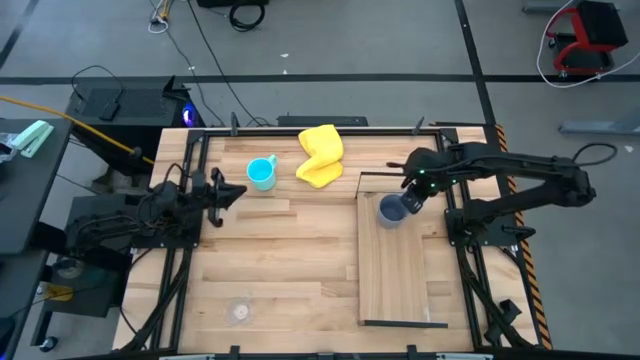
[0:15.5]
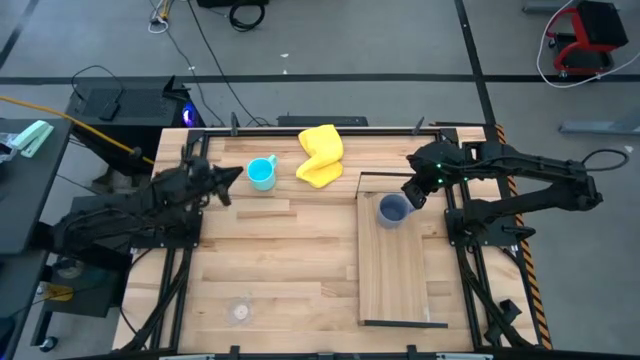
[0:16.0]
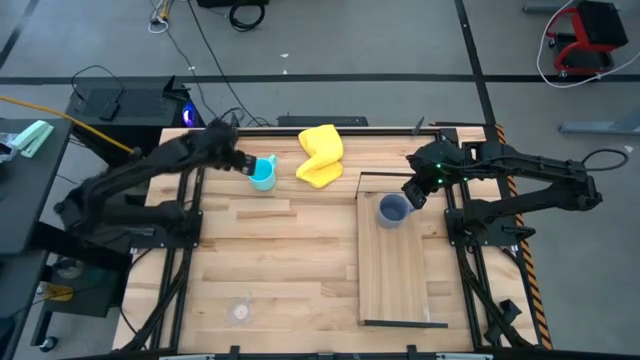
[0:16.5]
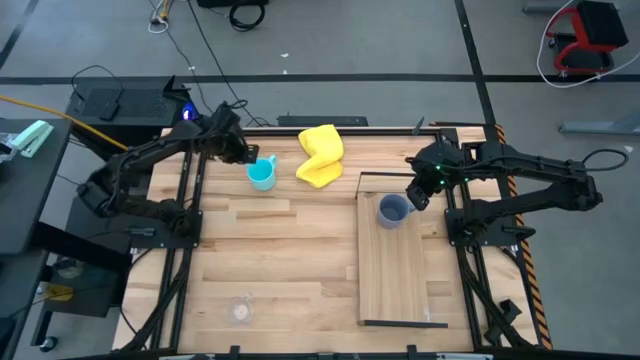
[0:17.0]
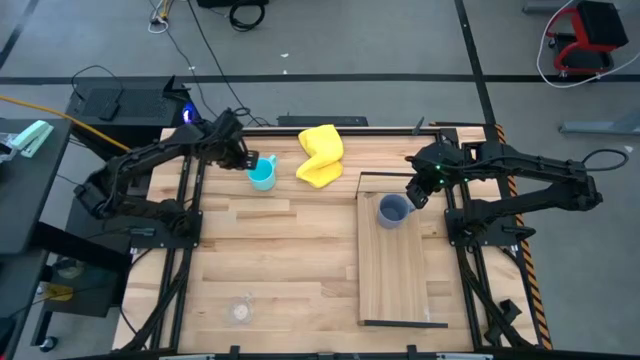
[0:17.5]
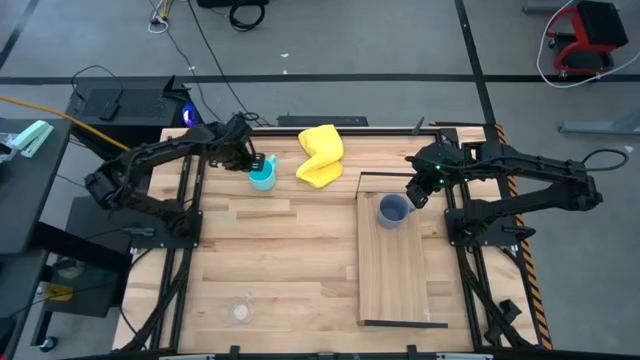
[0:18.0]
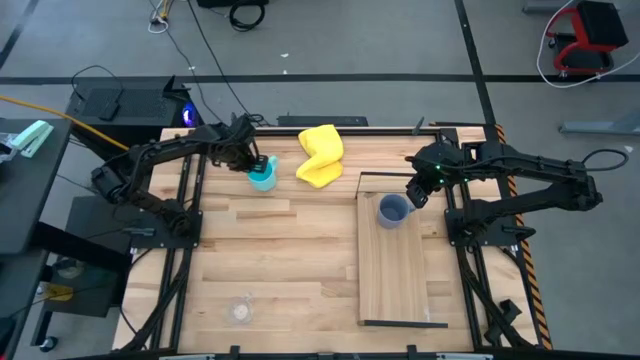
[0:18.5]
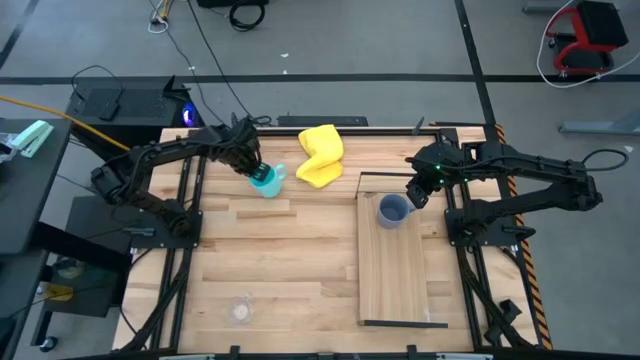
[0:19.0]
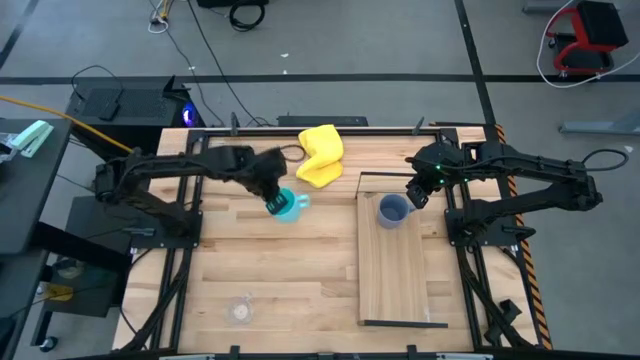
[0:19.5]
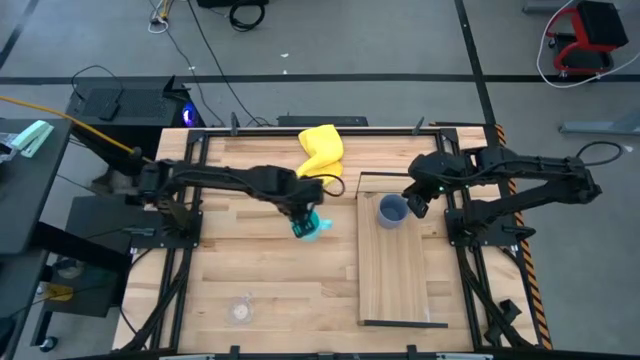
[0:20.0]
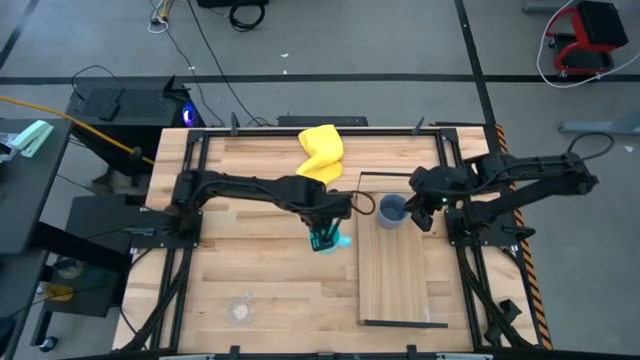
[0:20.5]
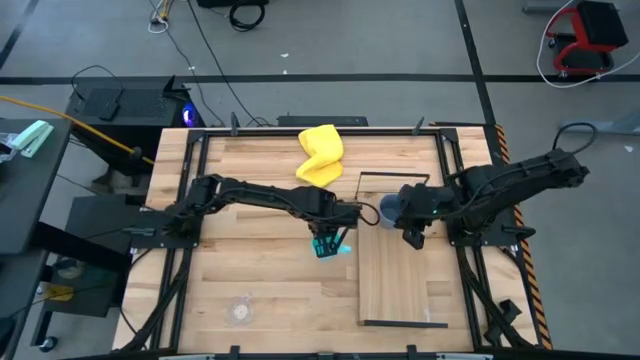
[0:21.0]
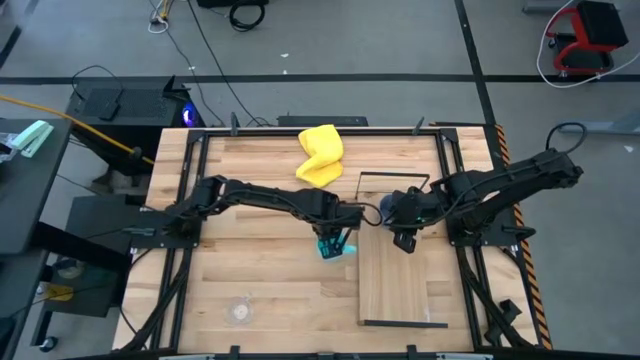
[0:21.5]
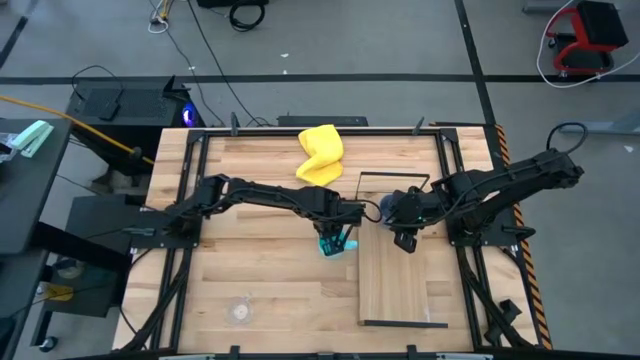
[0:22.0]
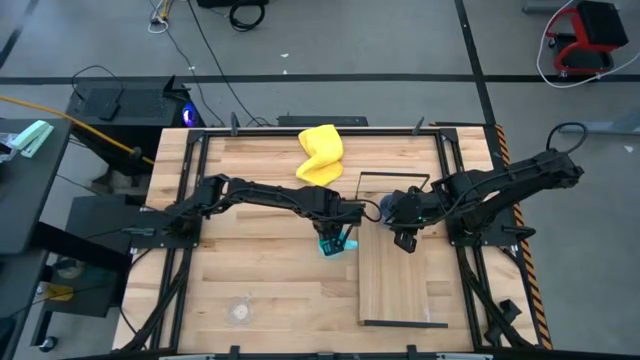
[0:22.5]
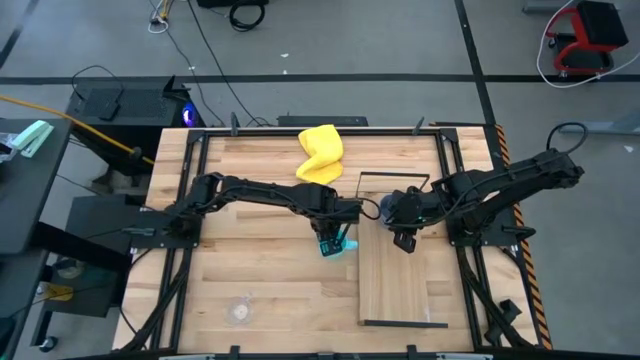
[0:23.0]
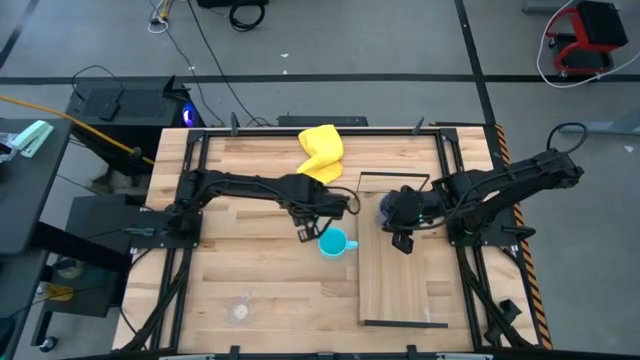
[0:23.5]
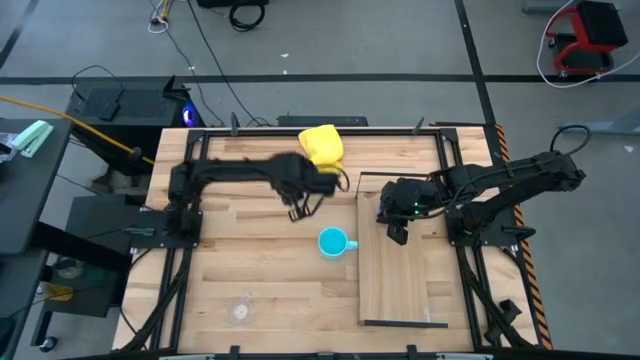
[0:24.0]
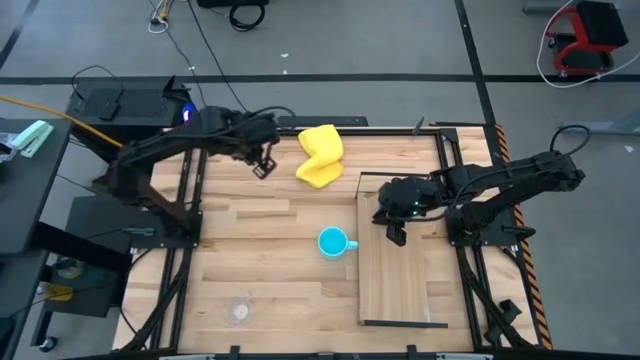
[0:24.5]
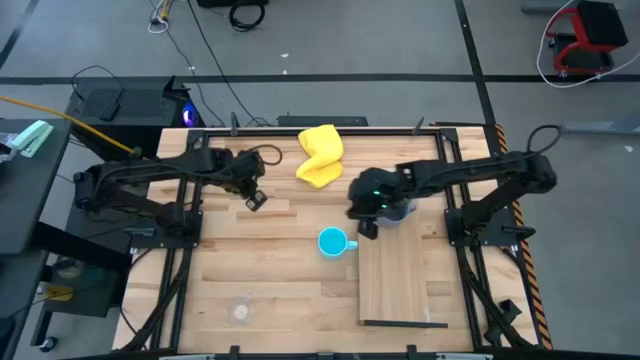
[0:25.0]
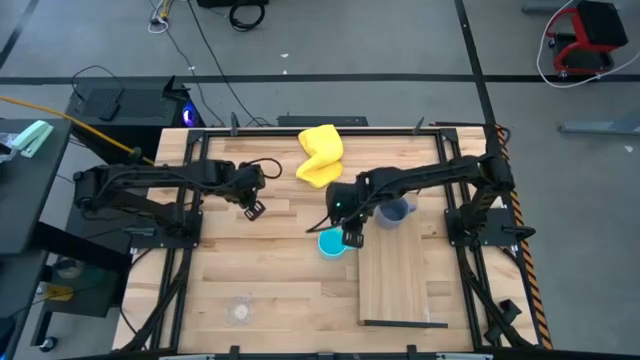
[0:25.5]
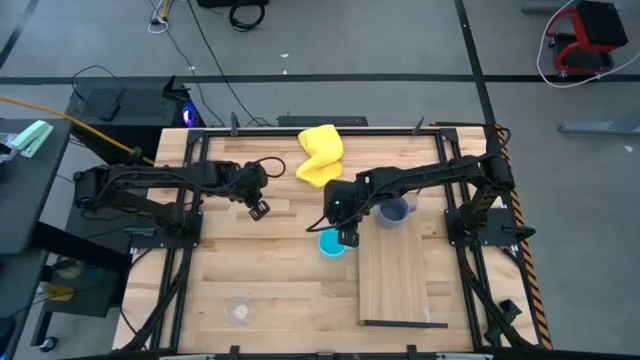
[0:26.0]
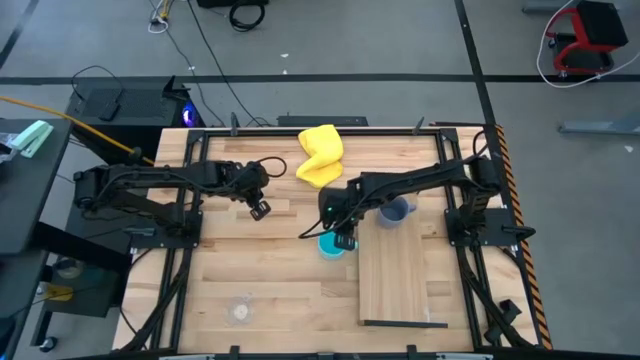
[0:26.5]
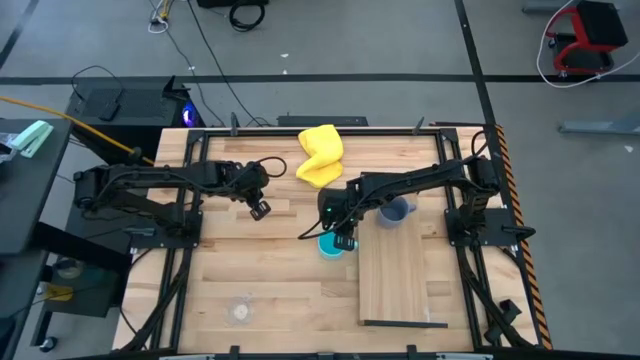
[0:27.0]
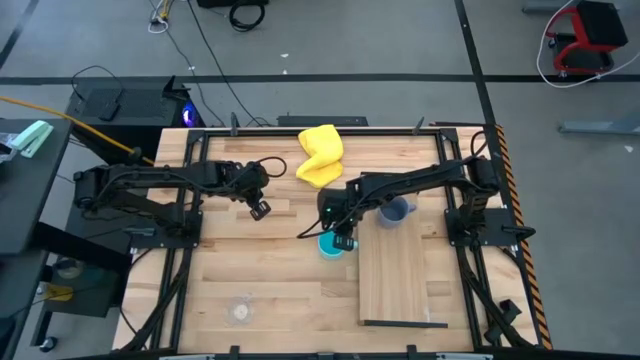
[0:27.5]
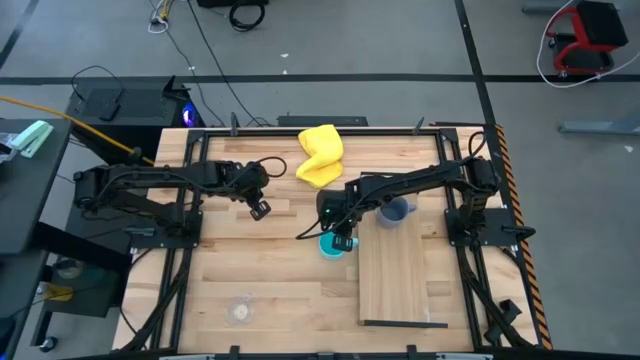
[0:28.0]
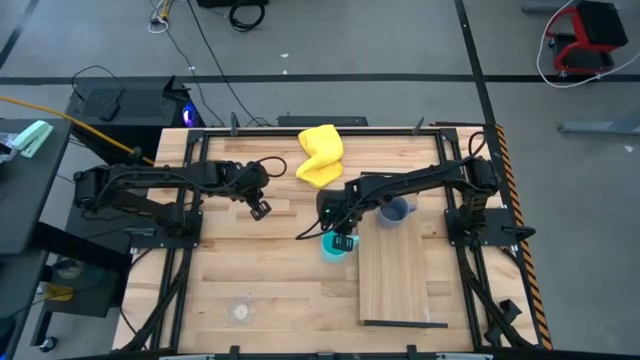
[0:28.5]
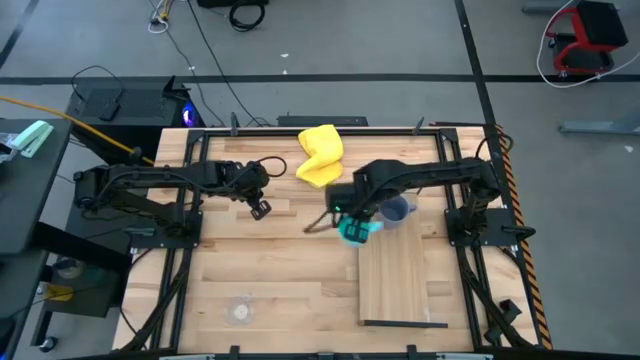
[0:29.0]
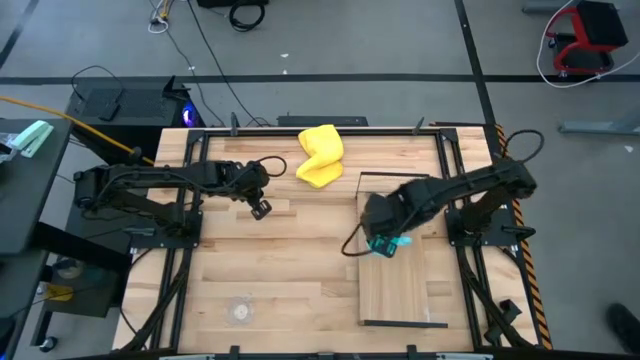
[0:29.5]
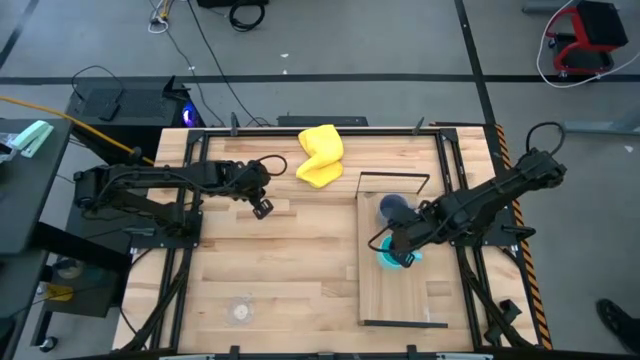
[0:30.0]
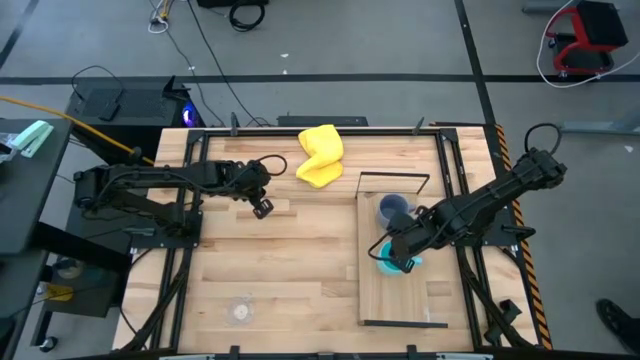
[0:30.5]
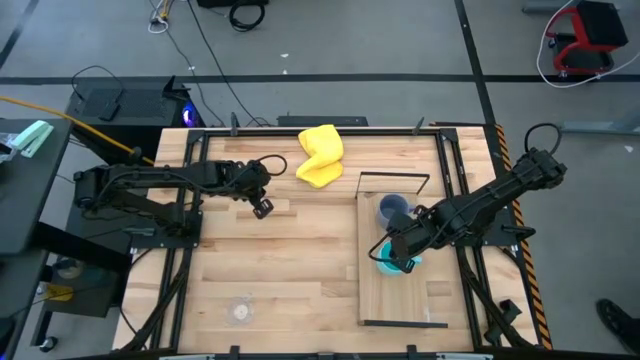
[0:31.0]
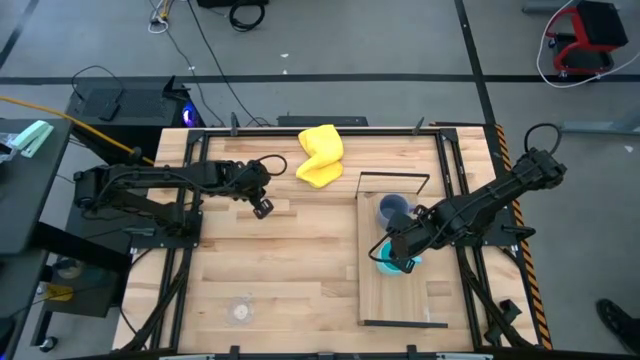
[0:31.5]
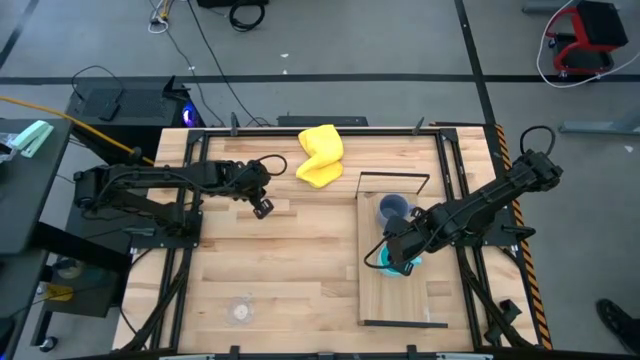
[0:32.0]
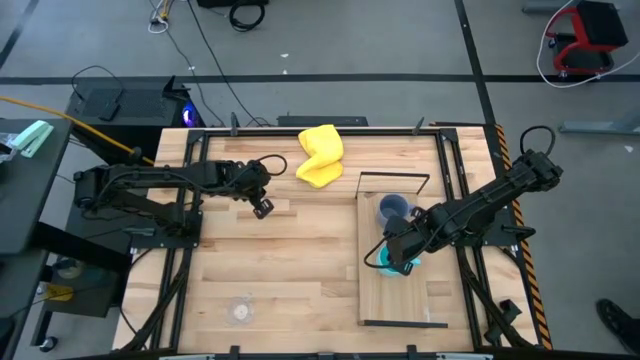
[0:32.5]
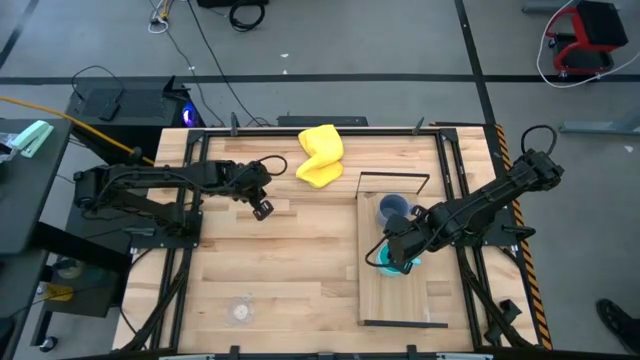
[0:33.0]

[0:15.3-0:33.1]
Task: Stack small to large cups/mugs on shelf
Put the blue mug on the shelf

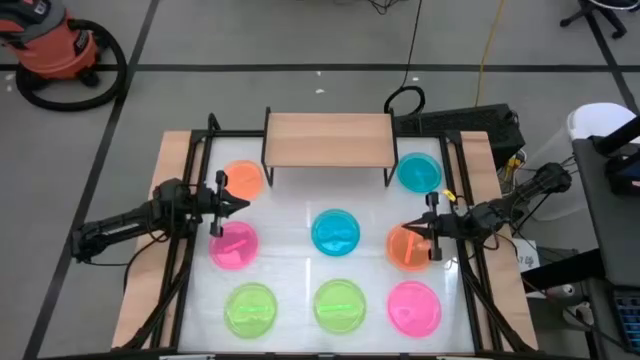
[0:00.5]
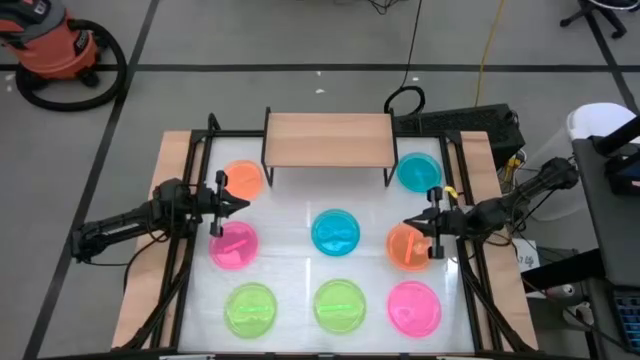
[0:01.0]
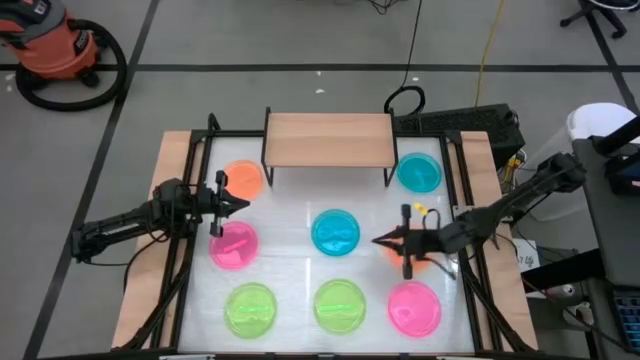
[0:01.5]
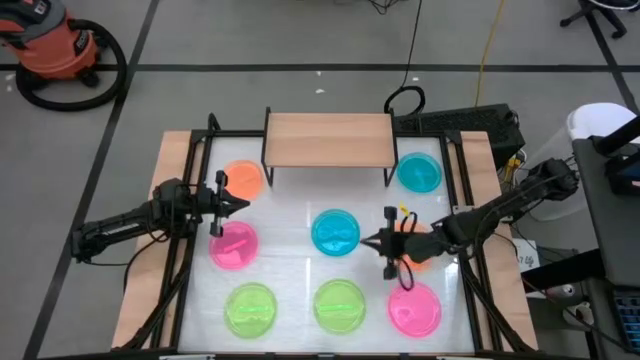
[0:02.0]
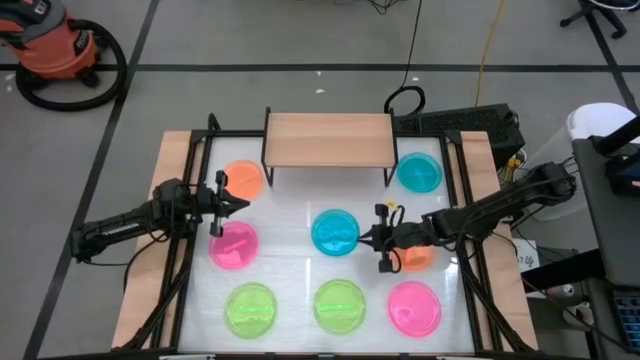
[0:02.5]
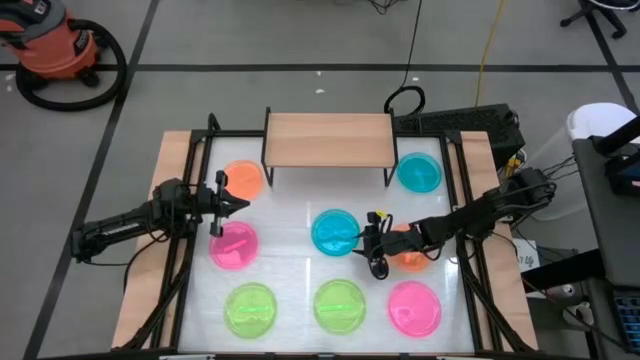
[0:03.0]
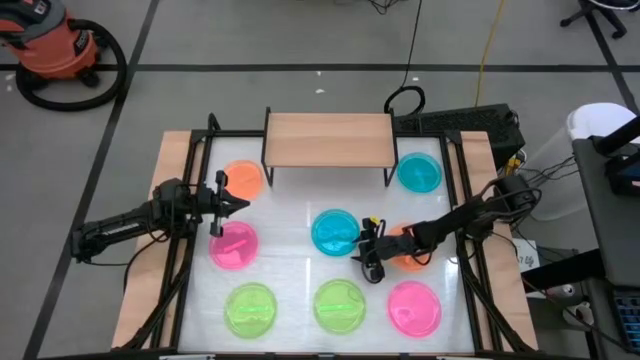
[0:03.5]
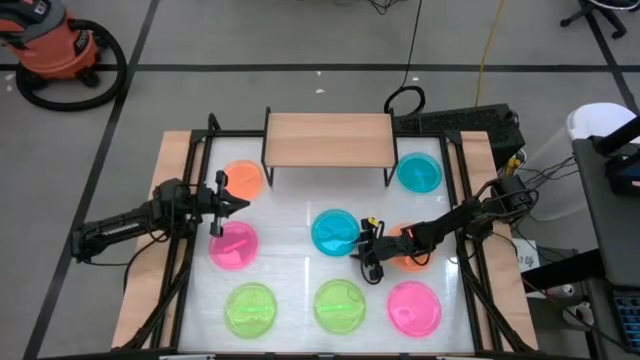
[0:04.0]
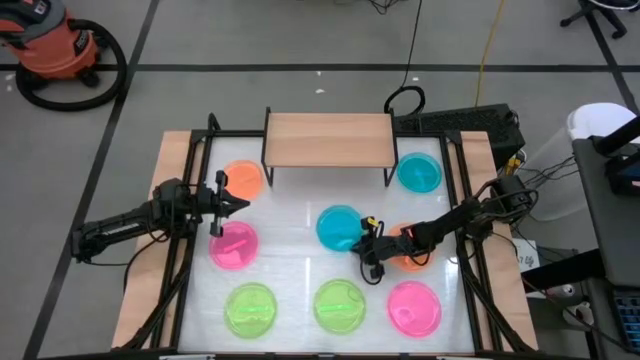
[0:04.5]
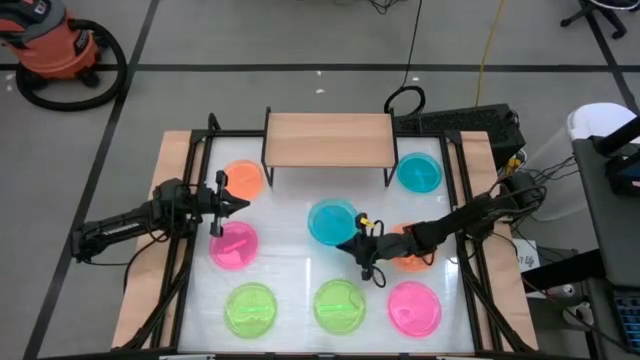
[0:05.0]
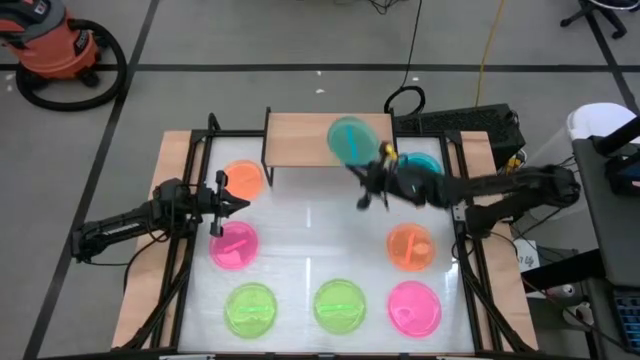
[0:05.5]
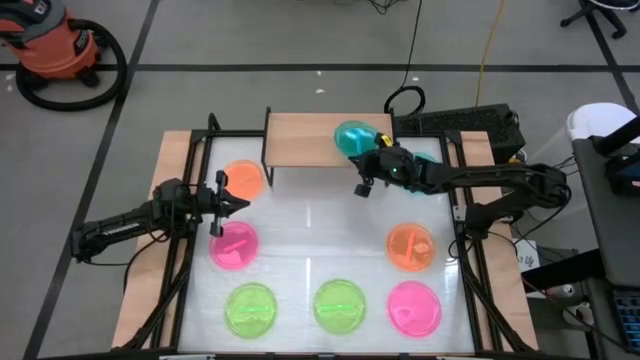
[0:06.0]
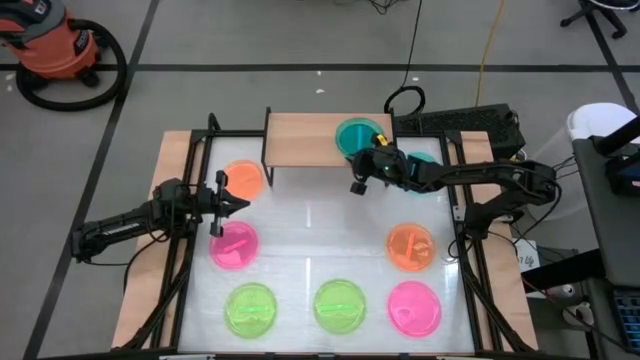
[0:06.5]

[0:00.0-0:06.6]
Task: Place and stack plates onto a shelf
Put the left blue transparent plate on the shelf
